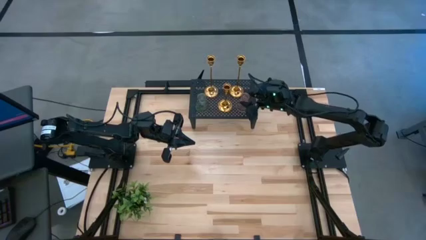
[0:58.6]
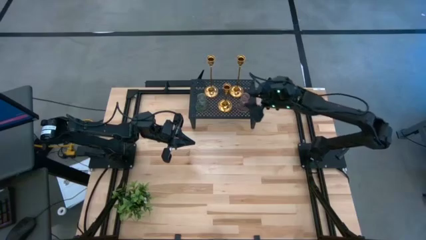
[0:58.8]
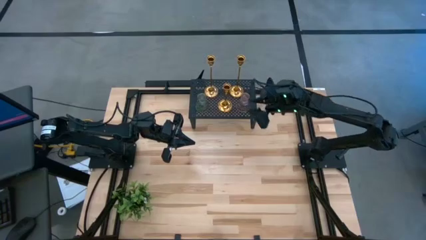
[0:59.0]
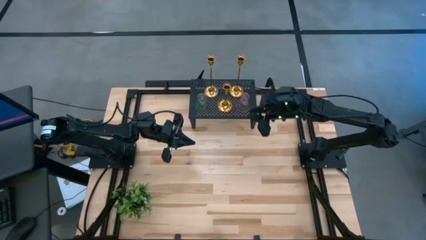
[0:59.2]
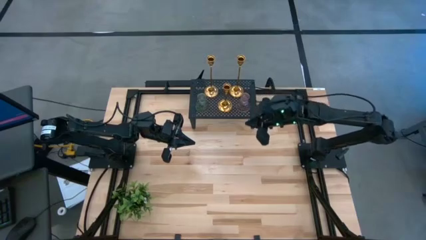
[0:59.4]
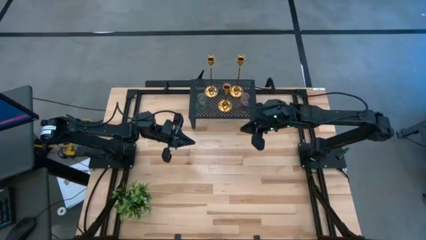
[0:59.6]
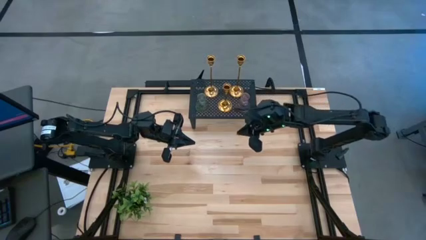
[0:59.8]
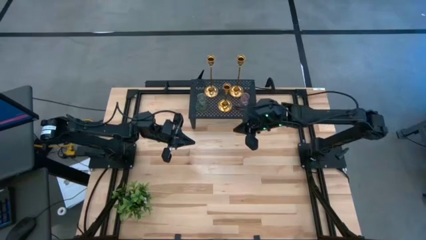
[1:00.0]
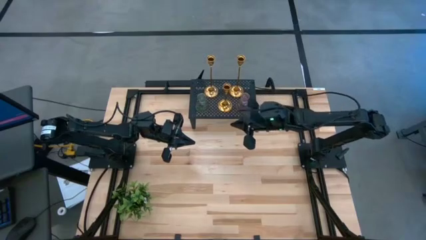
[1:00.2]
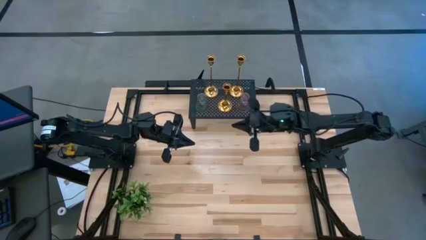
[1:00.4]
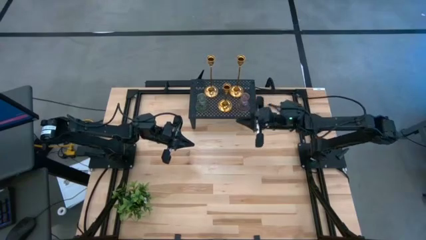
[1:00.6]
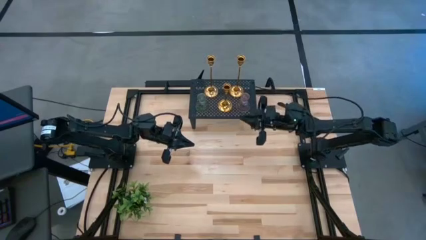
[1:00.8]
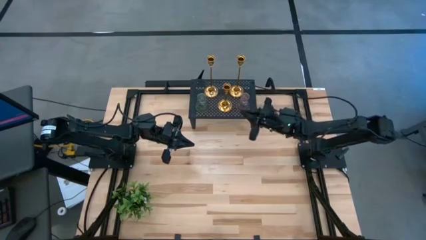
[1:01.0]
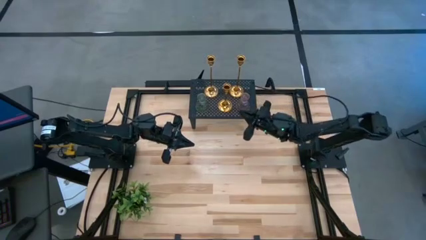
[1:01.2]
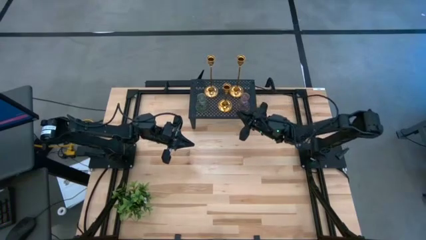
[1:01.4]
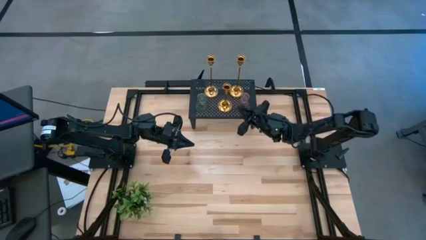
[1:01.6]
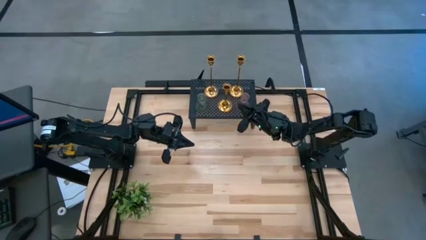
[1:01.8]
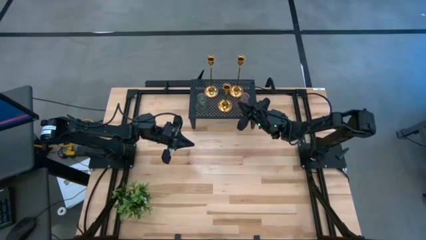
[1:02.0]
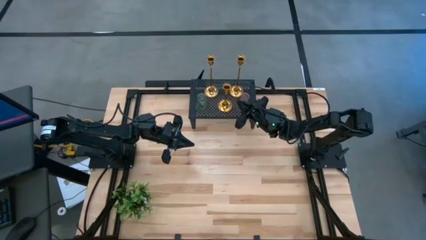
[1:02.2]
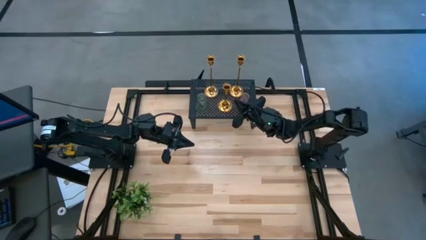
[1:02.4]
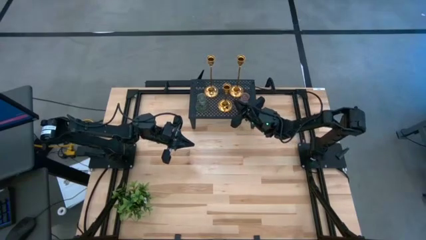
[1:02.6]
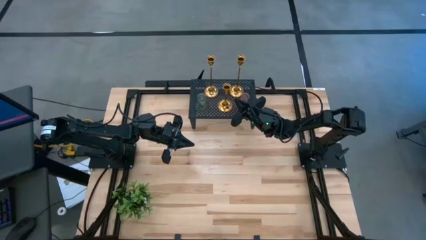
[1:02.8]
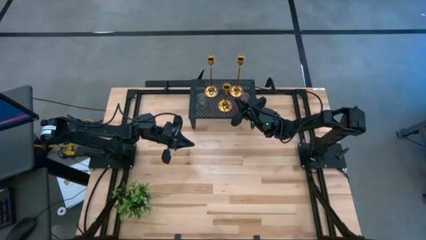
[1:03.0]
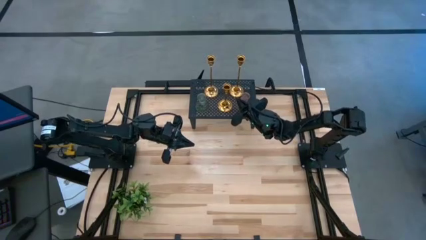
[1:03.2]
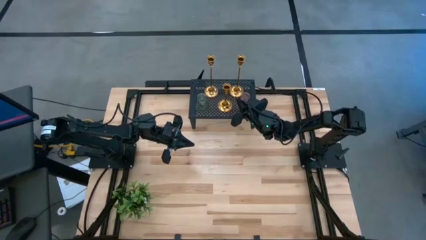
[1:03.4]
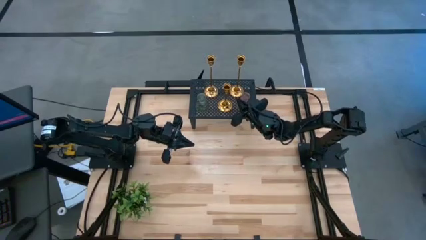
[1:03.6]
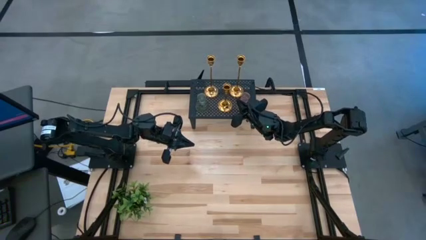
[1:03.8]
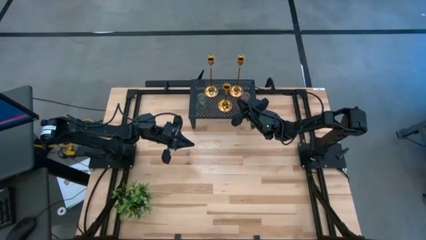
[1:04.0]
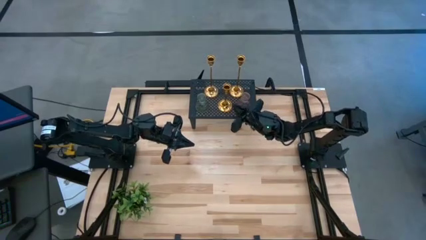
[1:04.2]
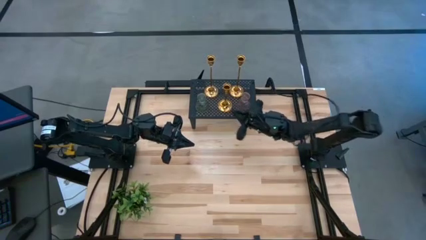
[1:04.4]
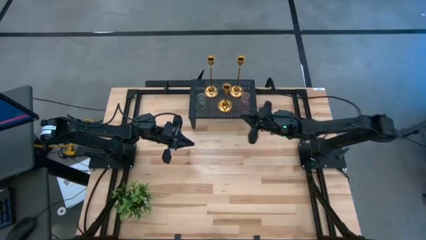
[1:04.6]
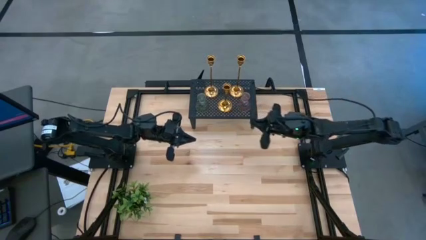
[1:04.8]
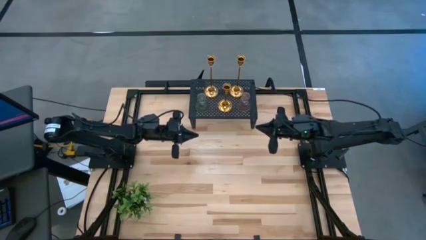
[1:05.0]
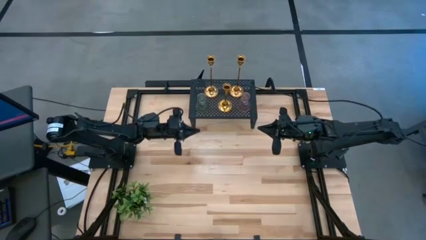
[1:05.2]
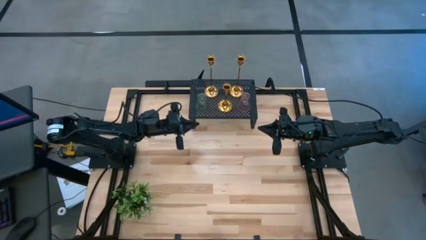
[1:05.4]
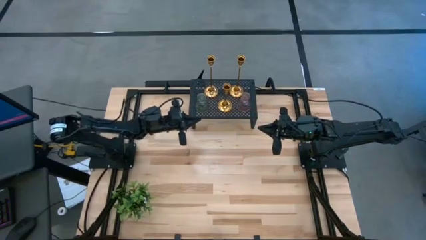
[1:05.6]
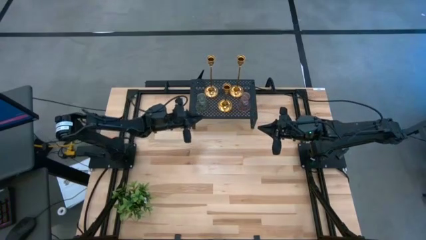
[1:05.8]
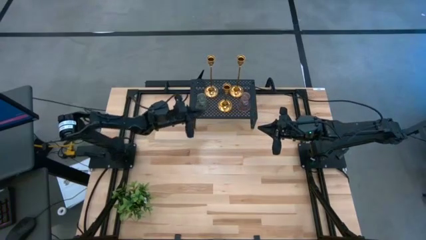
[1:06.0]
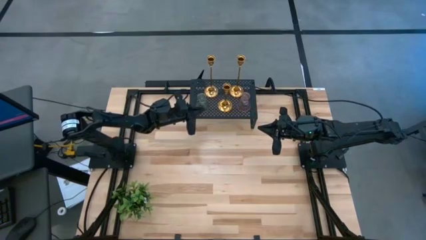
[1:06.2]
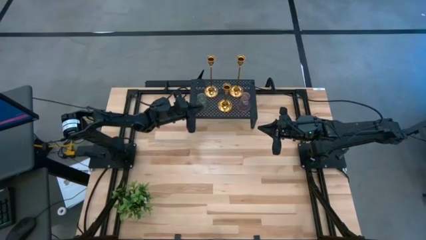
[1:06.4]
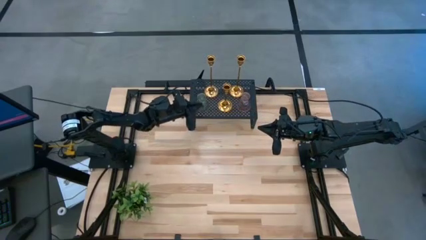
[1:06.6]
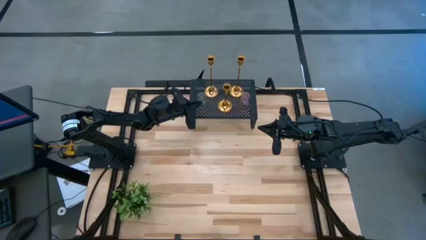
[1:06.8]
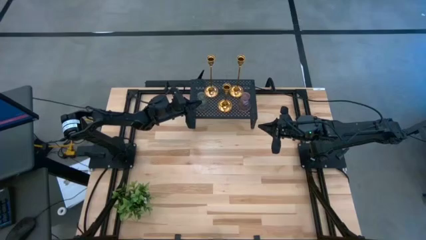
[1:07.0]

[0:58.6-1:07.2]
Task: Pick & Place candle stick holders
Adjust the glass candle holders on the shelf

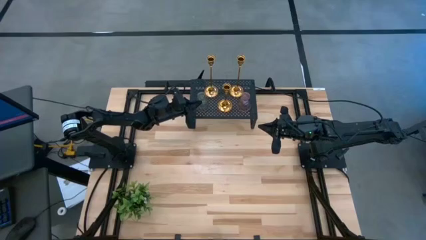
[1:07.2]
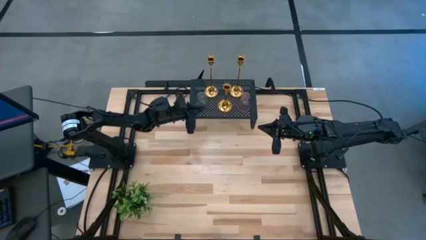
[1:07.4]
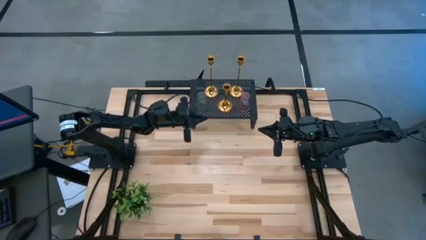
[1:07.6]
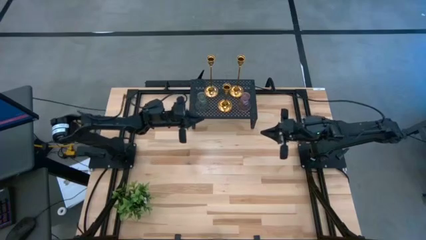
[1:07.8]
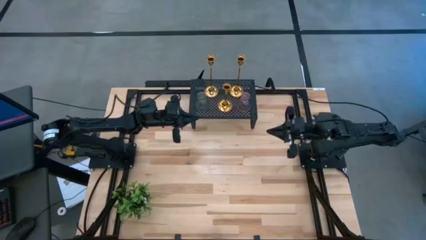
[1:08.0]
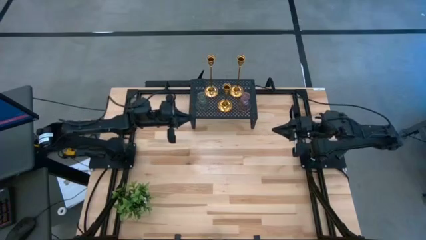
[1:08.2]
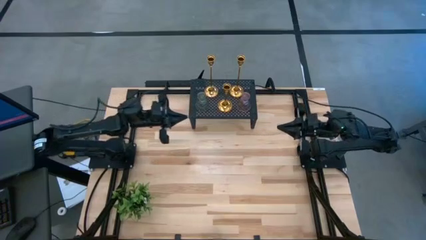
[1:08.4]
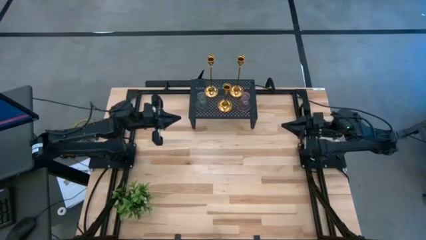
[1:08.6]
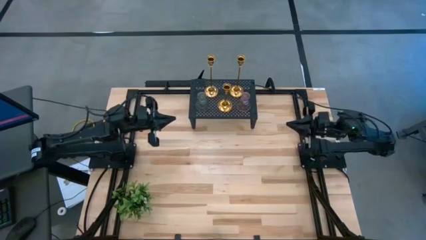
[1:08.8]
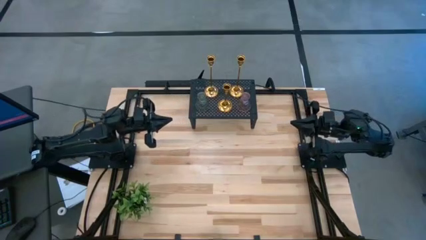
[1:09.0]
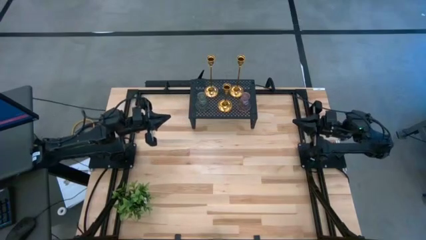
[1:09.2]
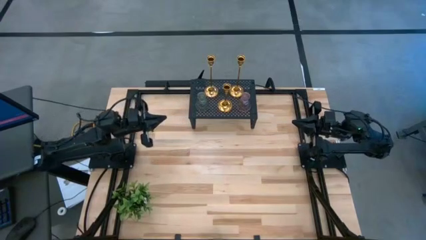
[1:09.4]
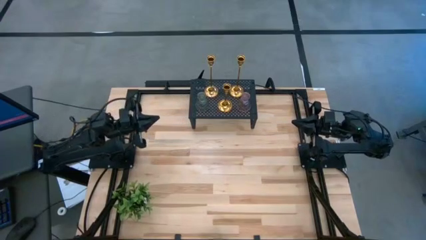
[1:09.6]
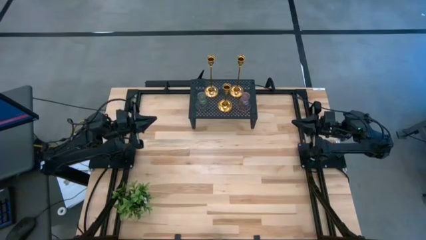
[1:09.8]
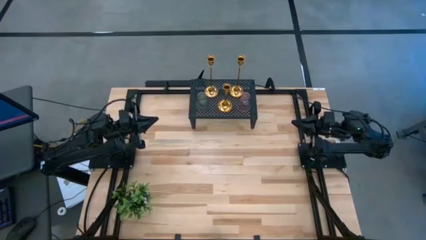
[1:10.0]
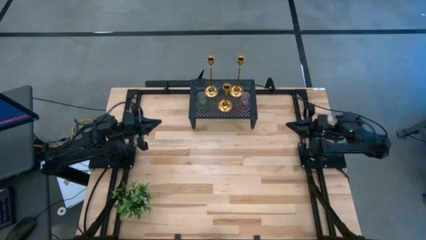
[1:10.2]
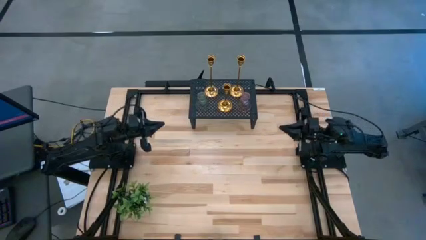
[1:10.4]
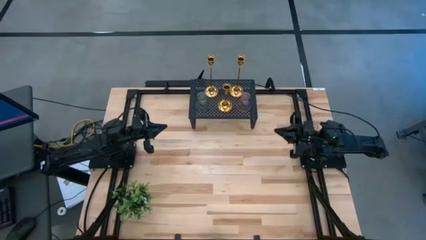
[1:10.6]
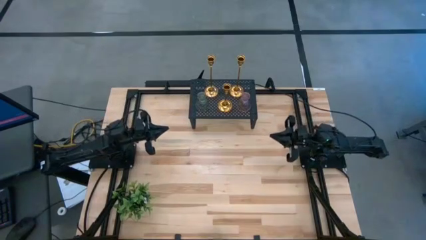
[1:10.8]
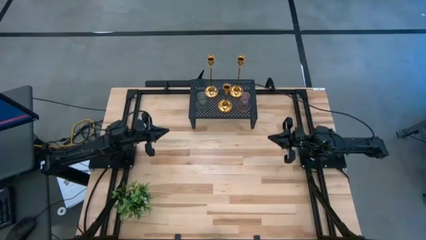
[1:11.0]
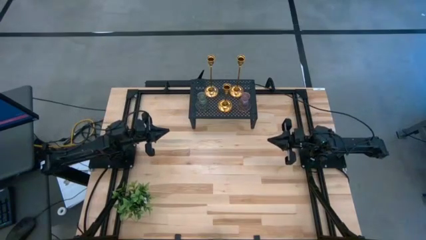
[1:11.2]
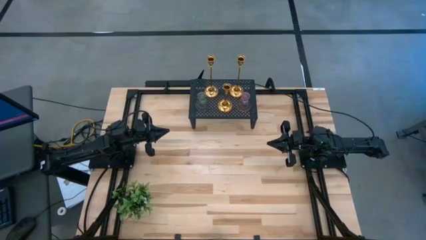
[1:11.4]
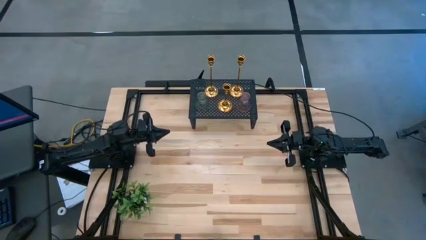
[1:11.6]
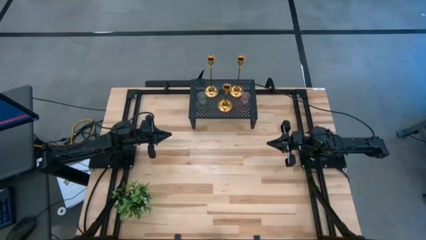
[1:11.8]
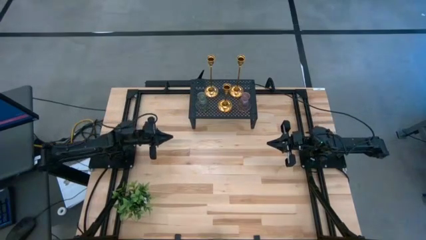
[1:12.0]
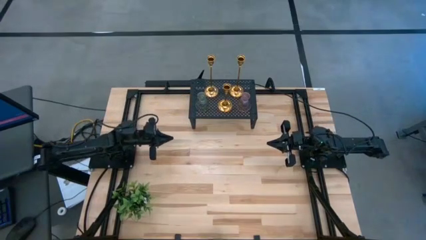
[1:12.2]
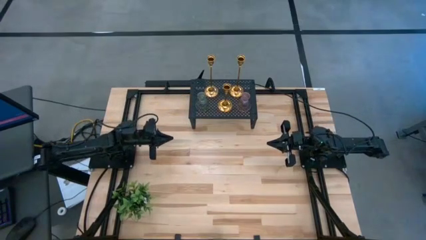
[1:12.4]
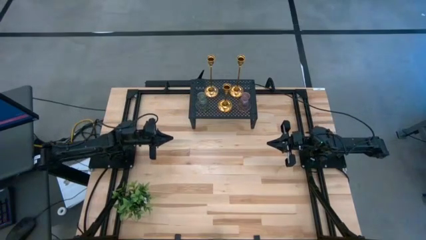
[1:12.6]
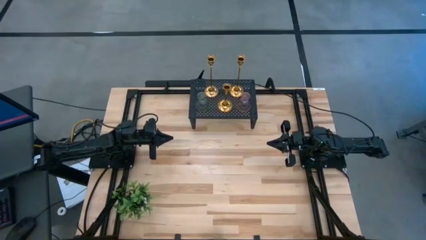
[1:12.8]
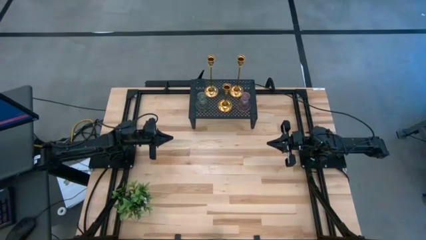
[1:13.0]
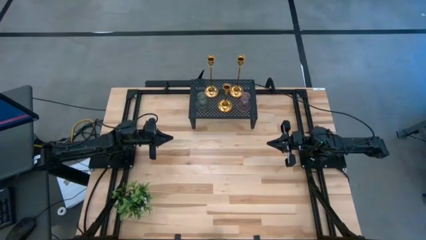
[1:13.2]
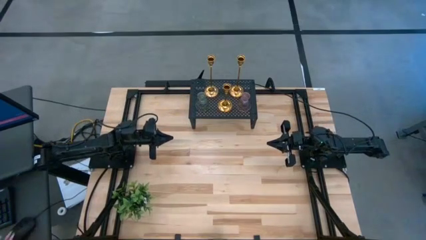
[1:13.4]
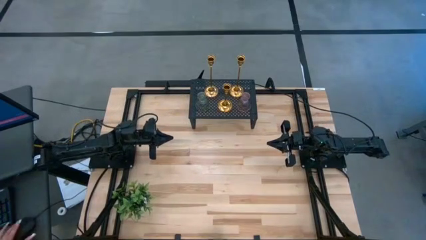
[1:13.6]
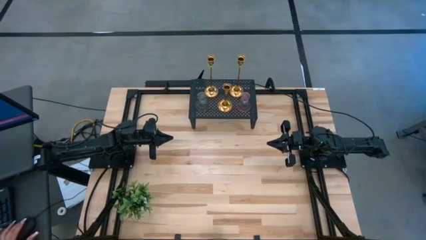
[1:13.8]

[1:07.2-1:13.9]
Return to Home Position
